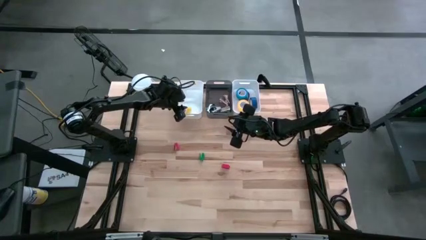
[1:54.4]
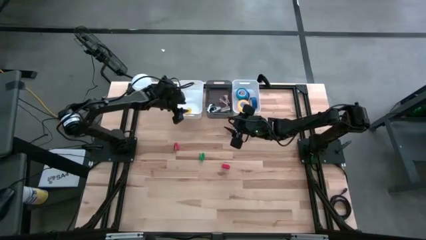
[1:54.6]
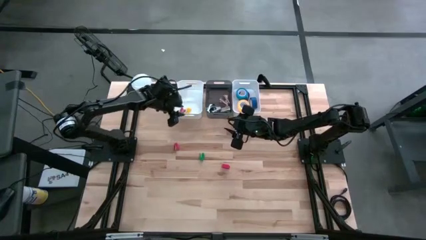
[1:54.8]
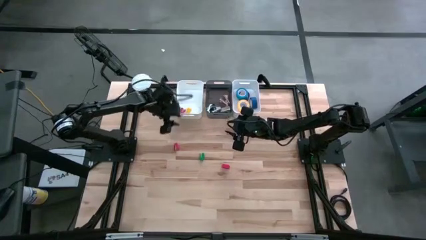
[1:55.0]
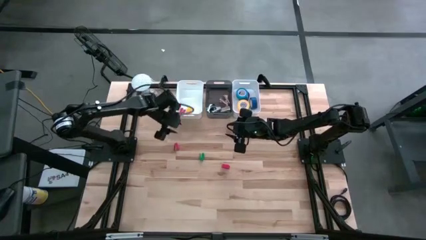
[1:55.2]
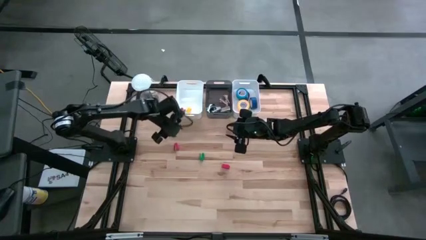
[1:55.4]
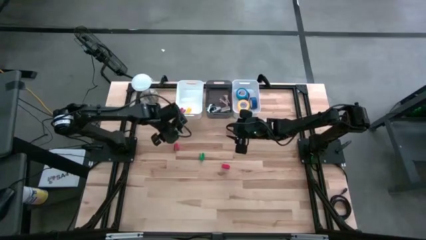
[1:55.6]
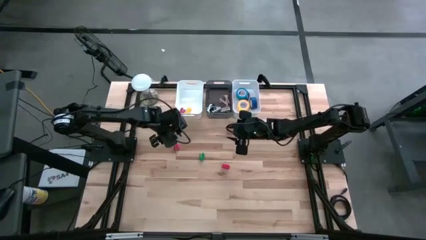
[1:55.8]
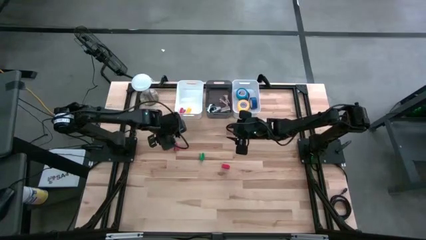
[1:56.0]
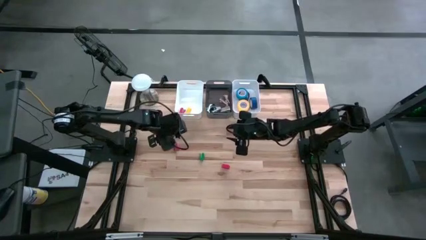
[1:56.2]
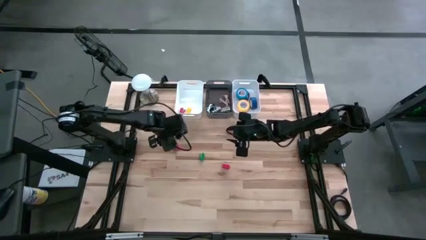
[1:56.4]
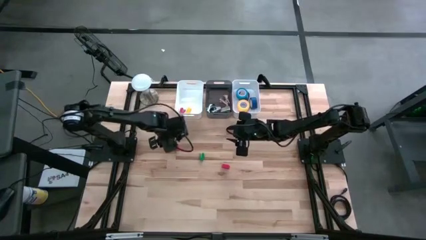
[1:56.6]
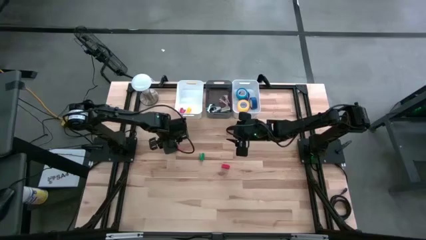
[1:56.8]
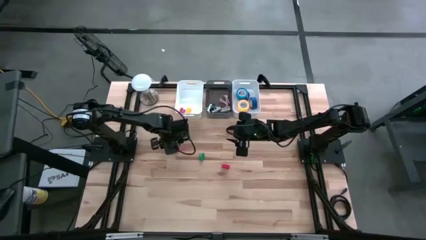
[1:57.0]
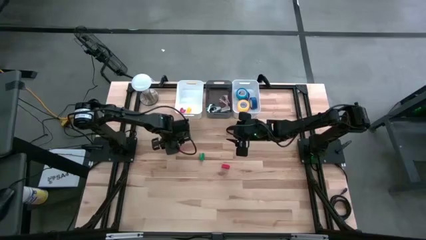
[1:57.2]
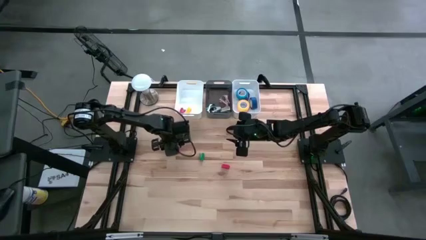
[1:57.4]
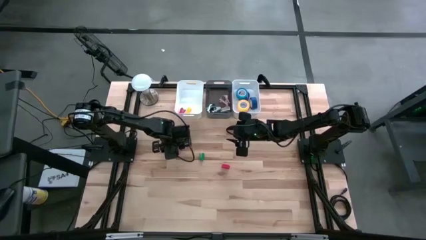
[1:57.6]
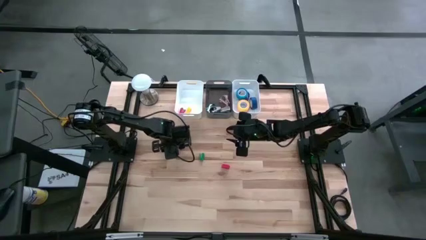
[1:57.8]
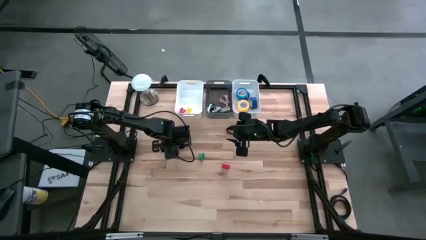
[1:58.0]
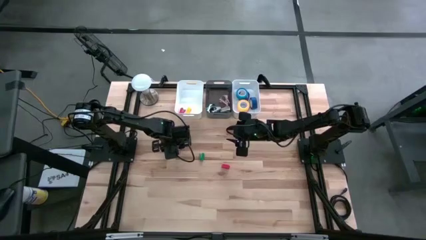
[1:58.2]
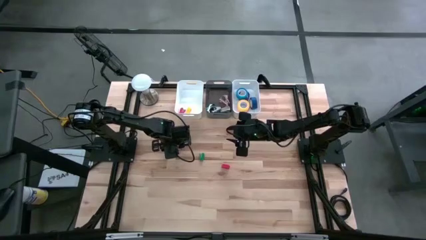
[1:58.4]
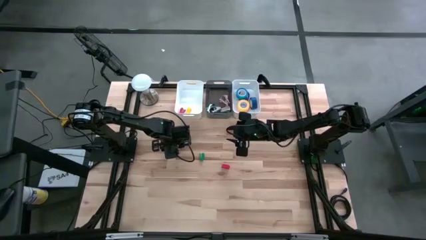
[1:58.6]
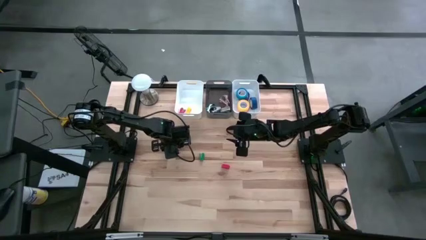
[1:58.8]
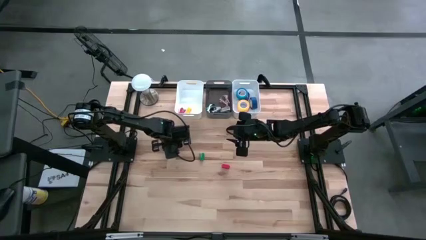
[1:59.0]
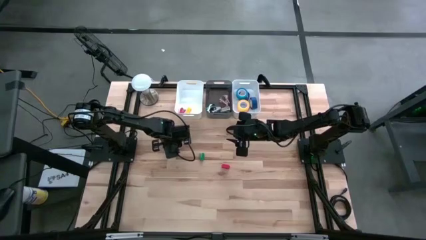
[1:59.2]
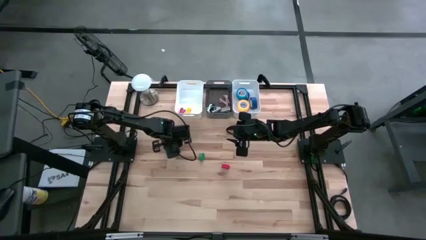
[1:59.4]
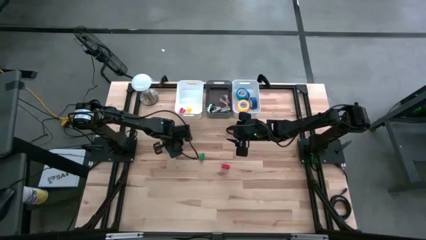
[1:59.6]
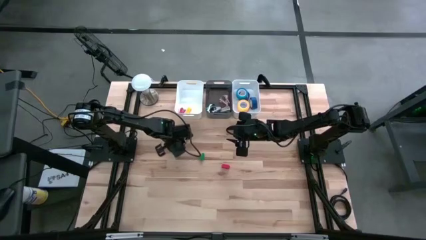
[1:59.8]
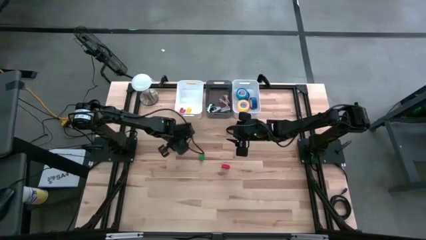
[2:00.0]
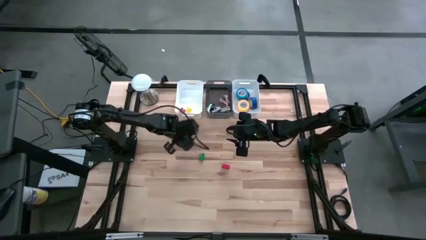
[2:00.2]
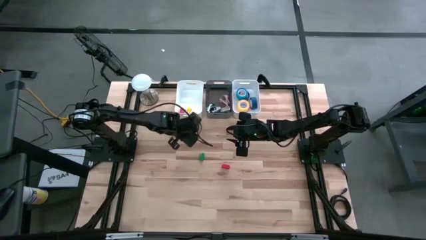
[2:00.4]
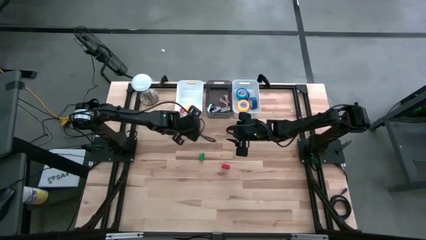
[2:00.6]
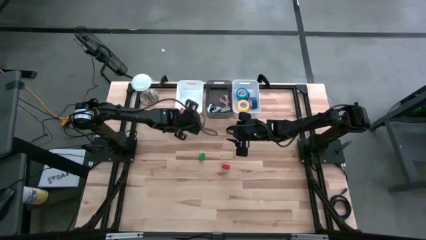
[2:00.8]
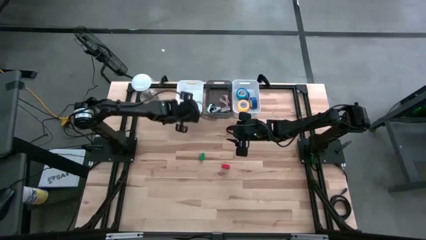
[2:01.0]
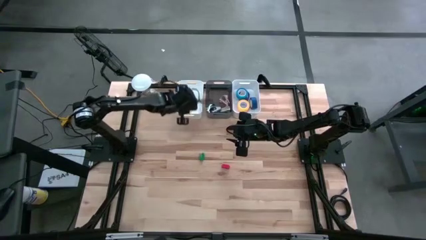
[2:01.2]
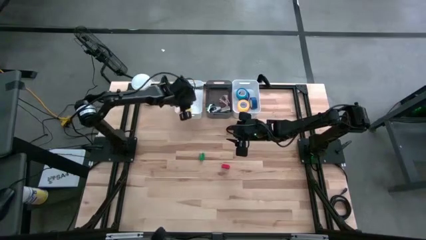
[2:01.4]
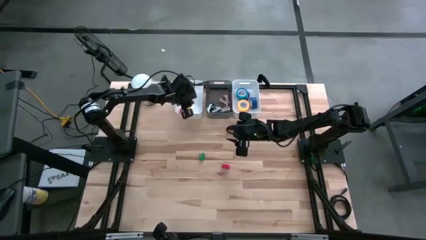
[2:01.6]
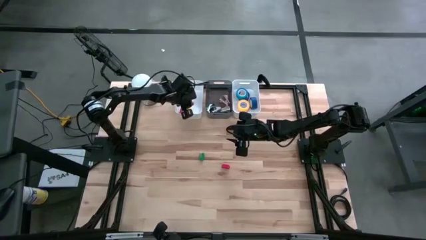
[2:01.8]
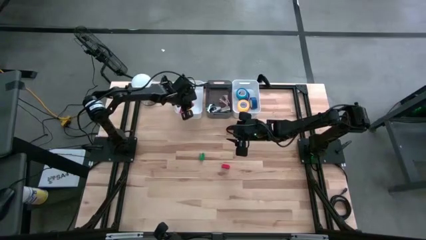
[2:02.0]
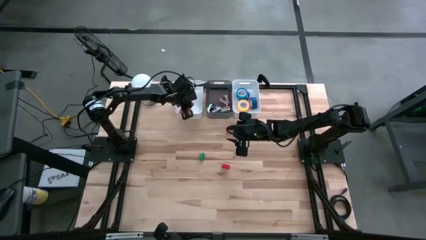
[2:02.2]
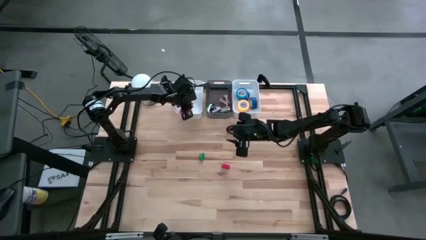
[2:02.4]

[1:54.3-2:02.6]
Task: Pick and place Stapler, Stapler remover, tape
Put the left red stapler into the left white bin

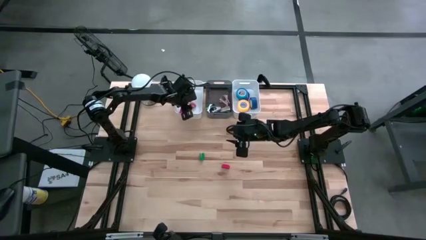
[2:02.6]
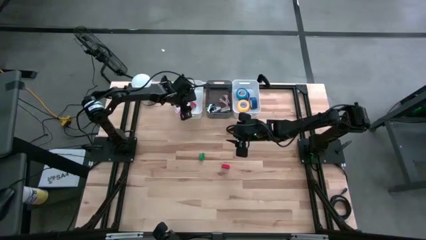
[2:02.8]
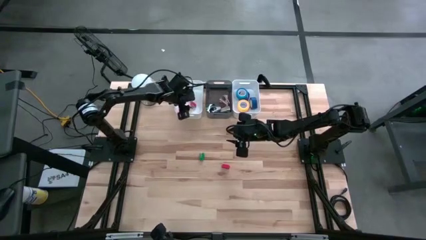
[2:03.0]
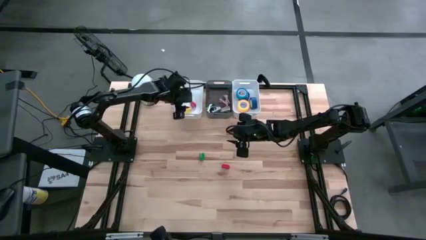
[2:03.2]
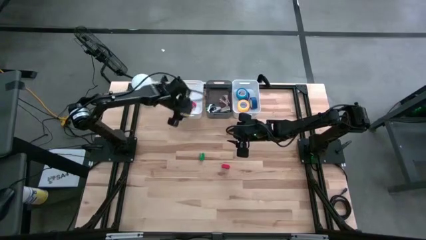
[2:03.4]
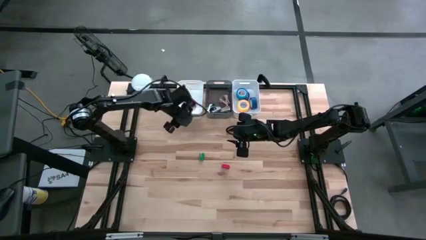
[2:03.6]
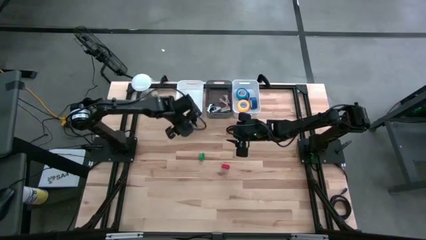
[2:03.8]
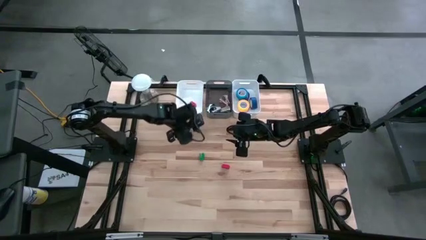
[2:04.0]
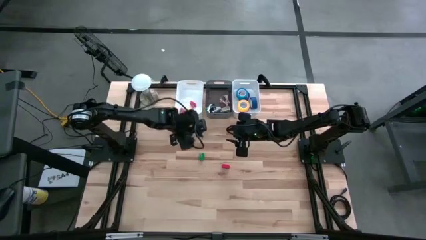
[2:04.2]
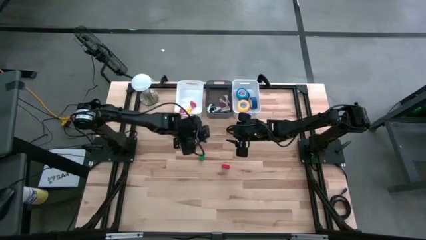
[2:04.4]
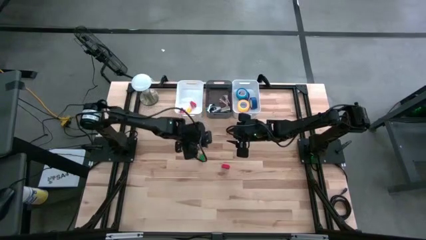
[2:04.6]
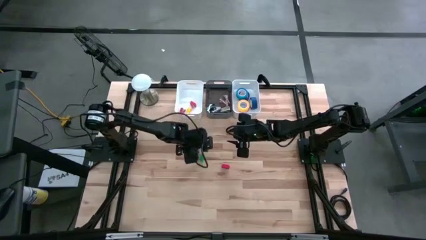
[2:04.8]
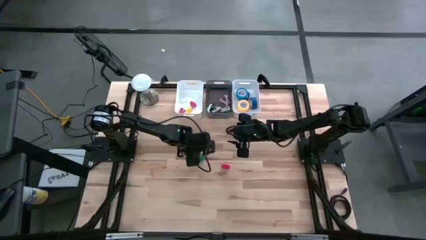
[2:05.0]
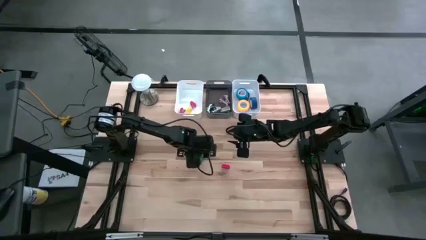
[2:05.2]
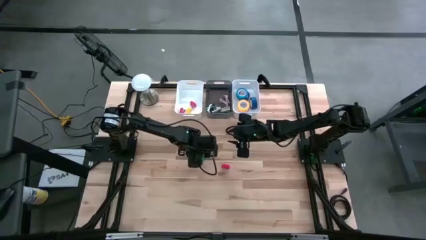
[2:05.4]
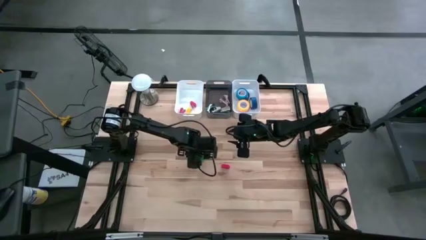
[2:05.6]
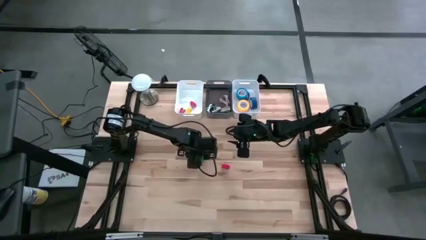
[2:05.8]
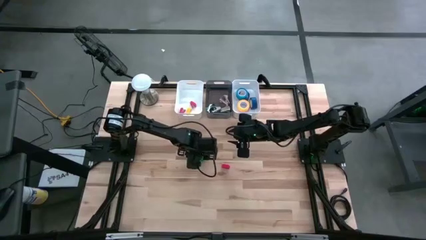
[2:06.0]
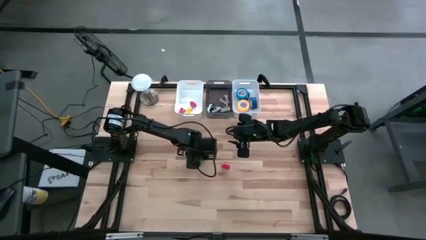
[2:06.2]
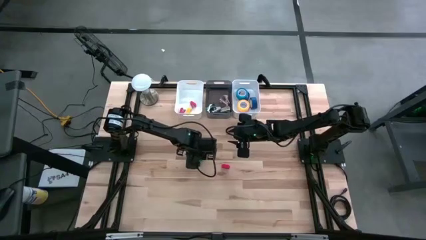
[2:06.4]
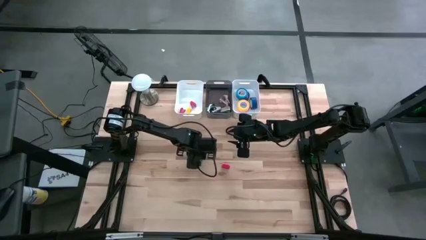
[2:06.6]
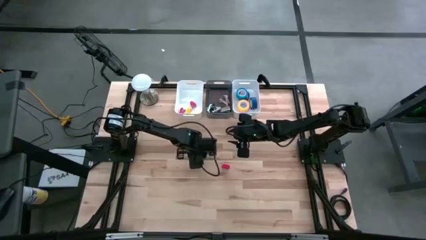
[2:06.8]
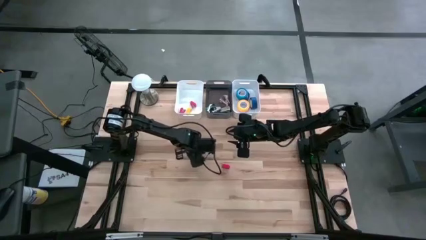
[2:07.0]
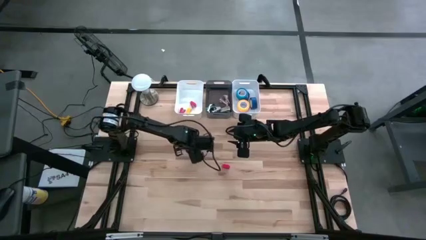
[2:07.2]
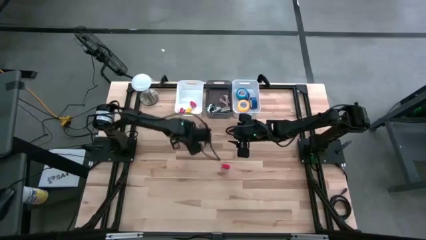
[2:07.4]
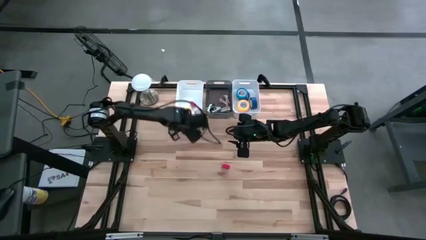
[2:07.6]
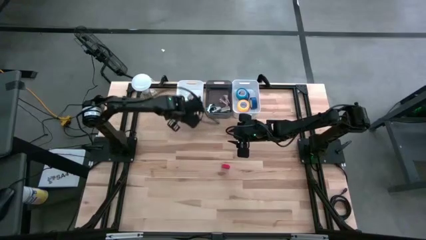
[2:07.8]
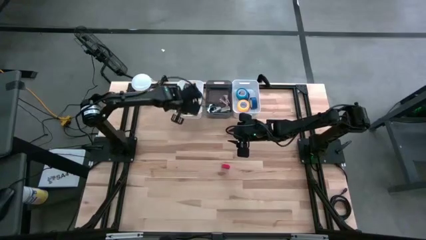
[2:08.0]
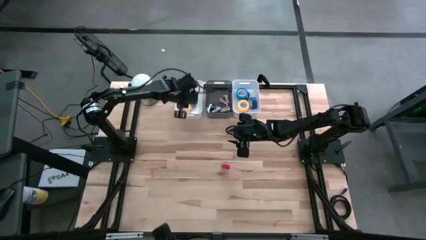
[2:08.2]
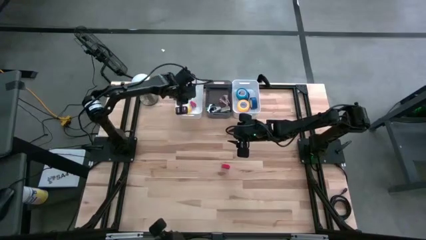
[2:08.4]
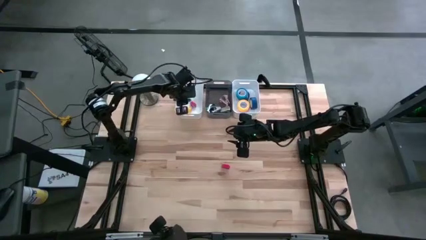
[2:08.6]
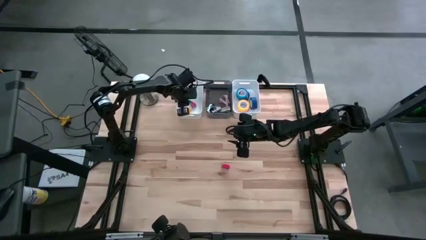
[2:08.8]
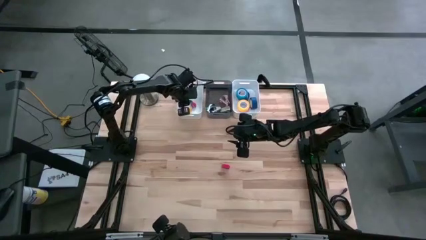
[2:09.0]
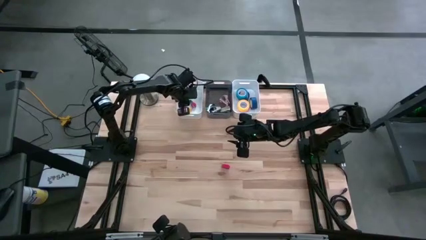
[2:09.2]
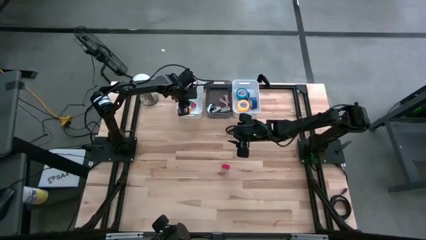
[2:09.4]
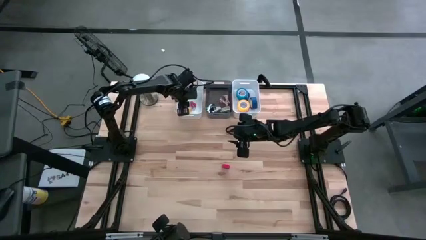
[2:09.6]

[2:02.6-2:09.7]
Put the green stapler into the left white bin

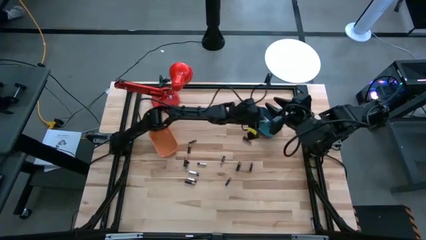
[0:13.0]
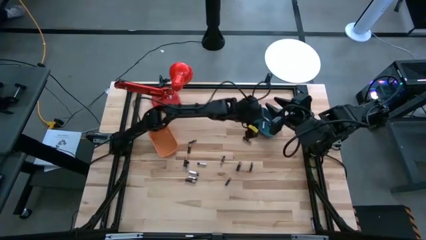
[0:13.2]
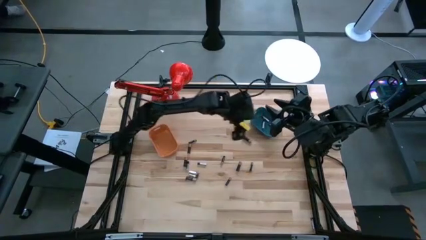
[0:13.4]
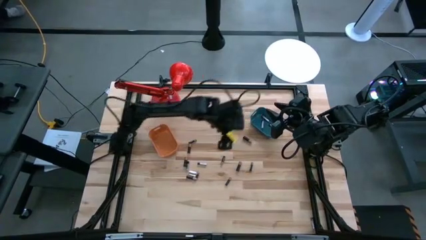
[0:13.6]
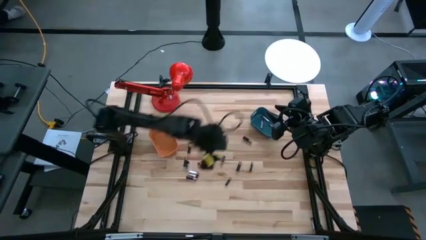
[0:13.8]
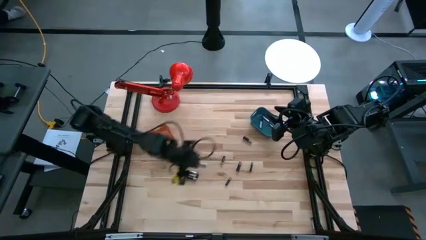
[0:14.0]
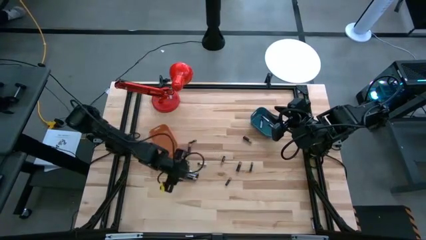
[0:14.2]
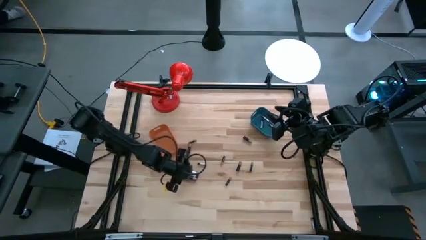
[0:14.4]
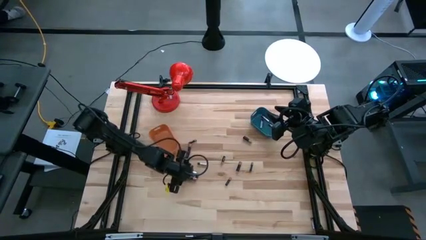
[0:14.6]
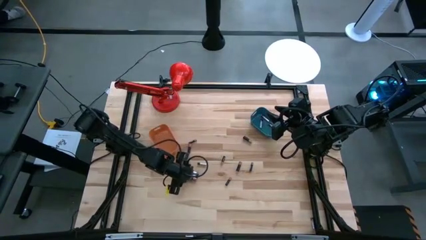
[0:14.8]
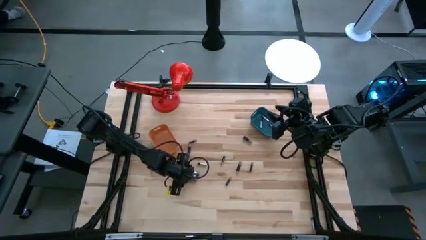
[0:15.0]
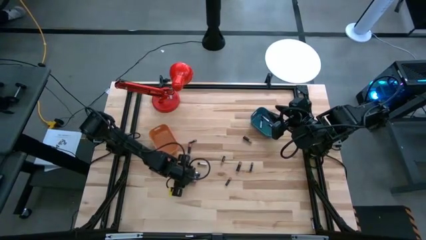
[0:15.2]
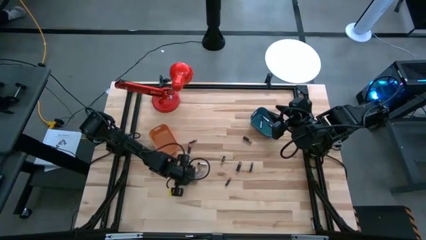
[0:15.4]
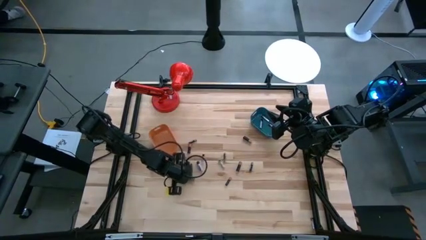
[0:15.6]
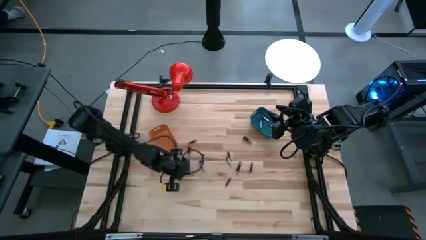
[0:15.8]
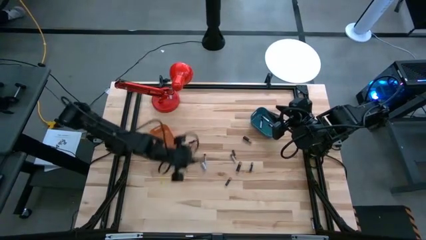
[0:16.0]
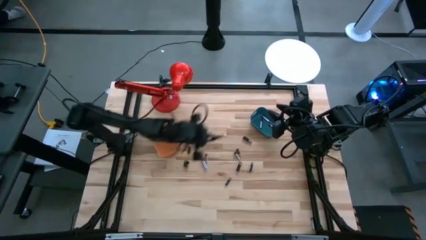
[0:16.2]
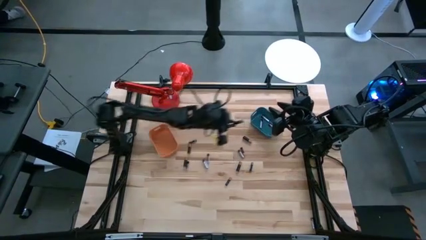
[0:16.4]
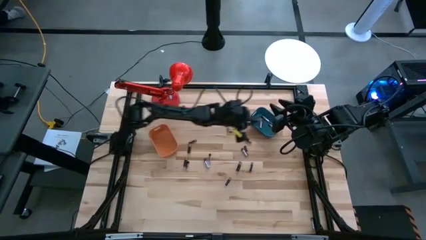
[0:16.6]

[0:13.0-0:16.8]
Task: Sort batteries
Put the black battery into the blue bin
